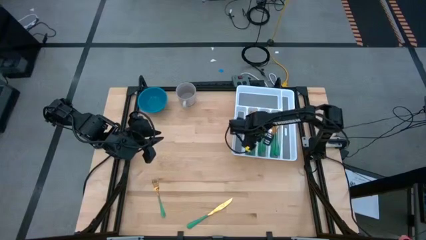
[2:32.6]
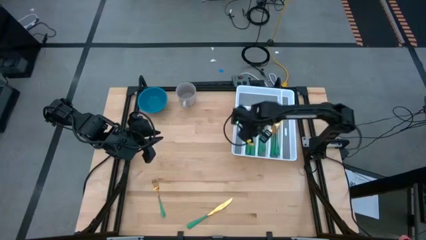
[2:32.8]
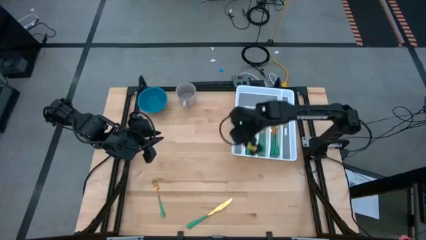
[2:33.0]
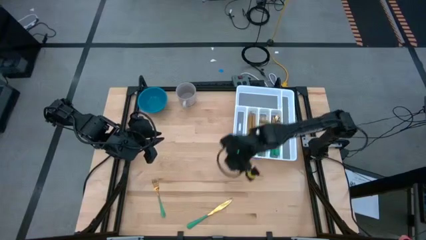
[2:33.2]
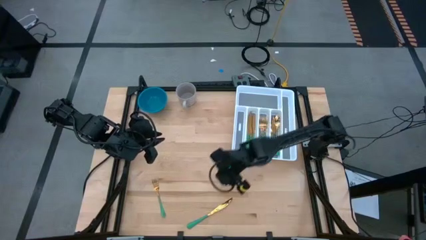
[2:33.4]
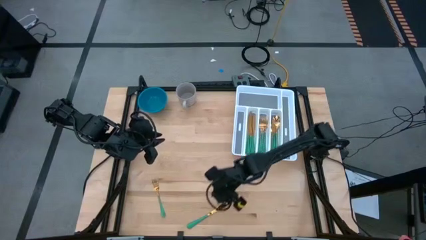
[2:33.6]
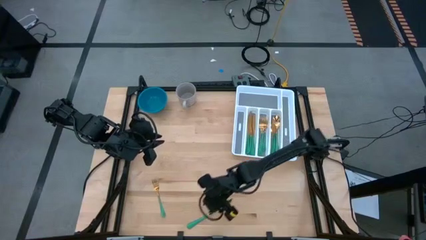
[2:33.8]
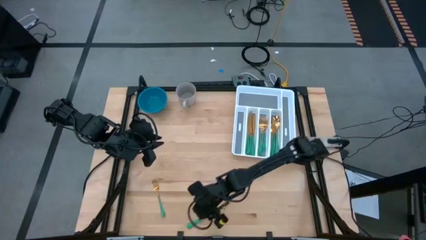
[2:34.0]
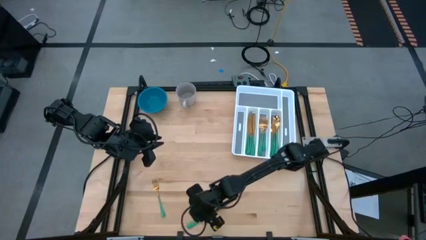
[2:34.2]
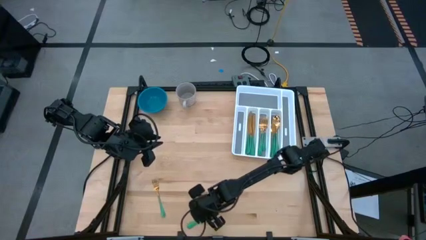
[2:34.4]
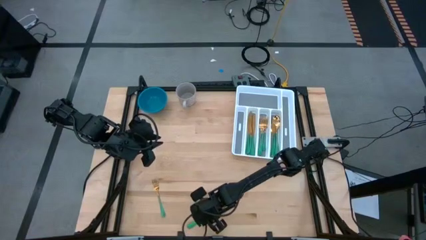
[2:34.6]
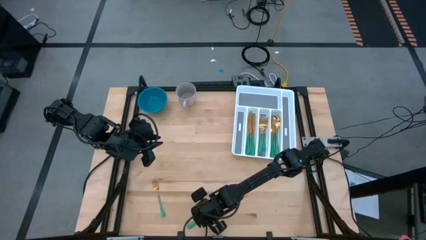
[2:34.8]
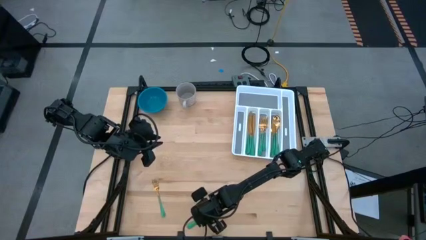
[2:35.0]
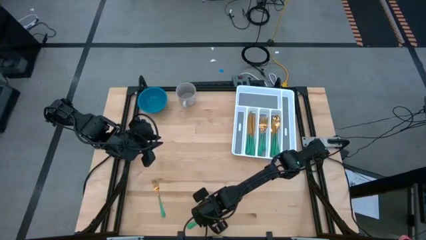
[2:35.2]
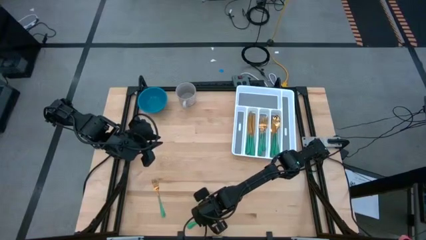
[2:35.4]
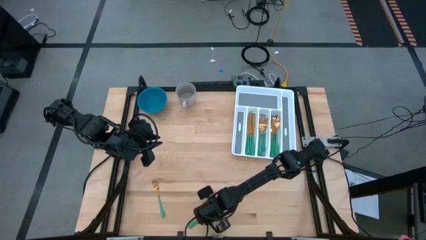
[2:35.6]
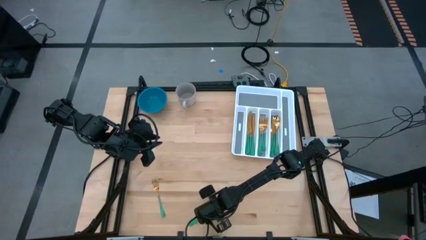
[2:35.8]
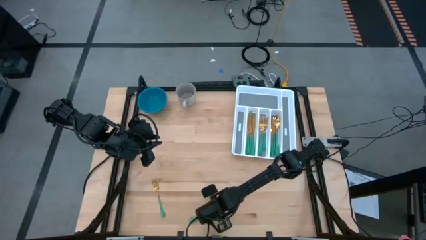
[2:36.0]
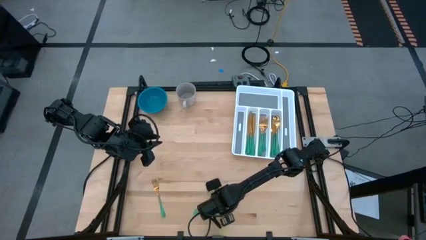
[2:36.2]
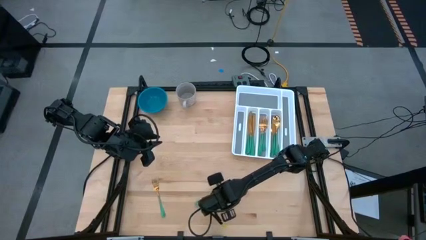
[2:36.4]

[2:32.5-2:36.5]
Task: Sort silverware
Put the green table knife into the white cutlery tray

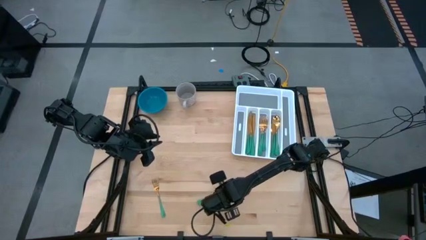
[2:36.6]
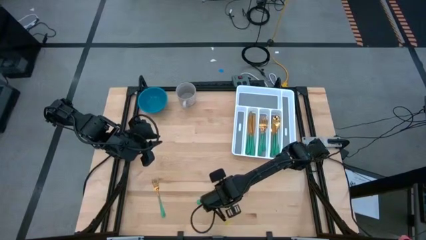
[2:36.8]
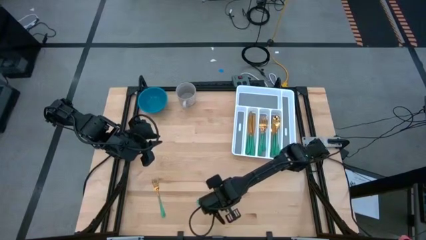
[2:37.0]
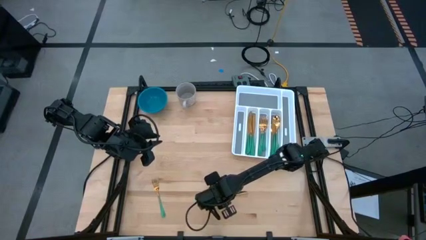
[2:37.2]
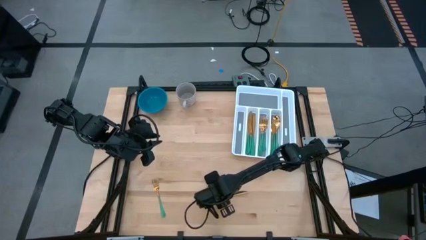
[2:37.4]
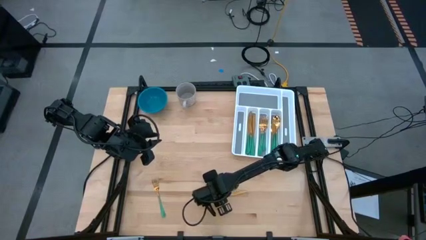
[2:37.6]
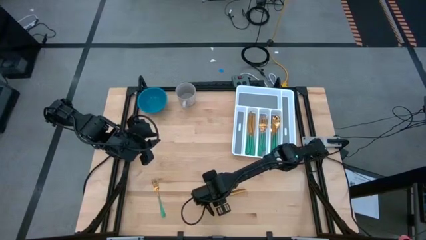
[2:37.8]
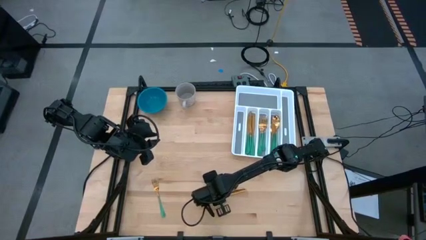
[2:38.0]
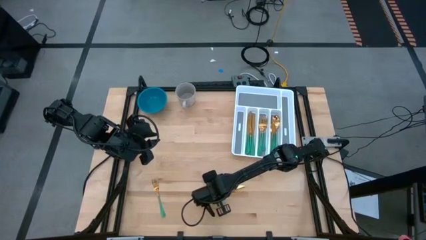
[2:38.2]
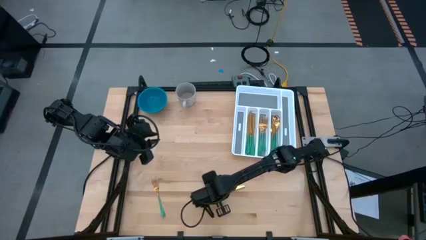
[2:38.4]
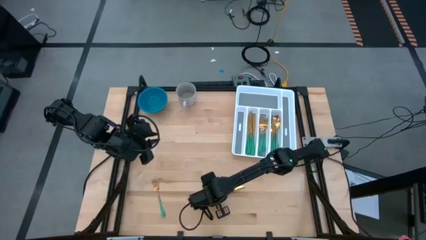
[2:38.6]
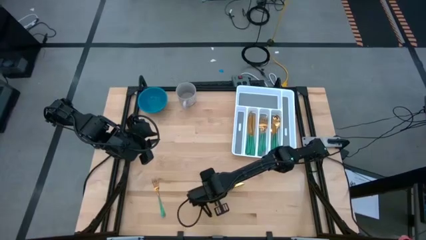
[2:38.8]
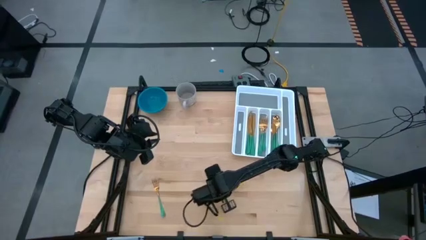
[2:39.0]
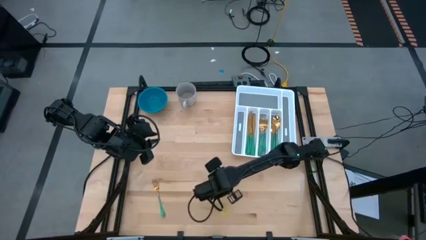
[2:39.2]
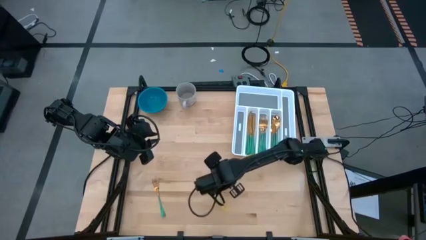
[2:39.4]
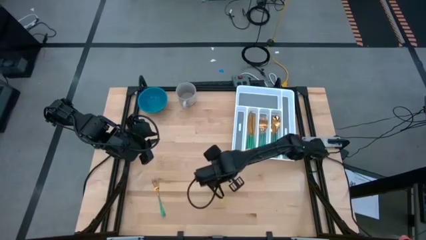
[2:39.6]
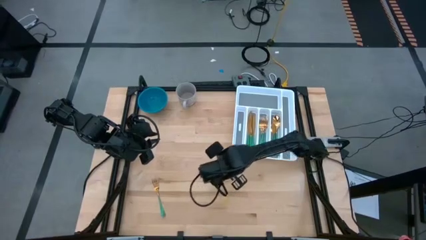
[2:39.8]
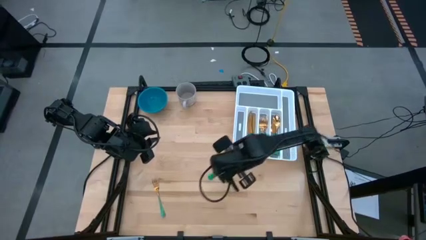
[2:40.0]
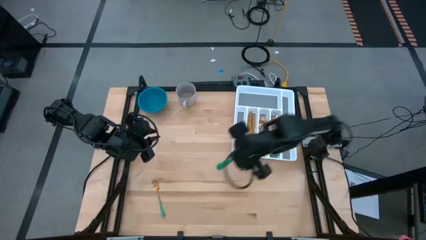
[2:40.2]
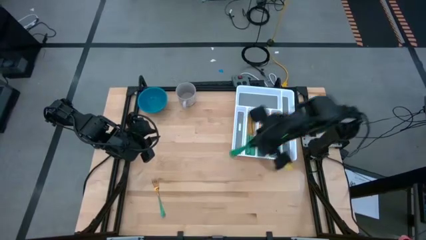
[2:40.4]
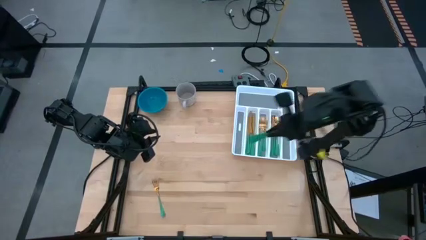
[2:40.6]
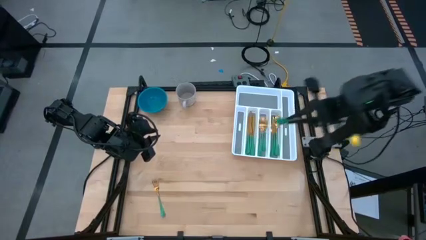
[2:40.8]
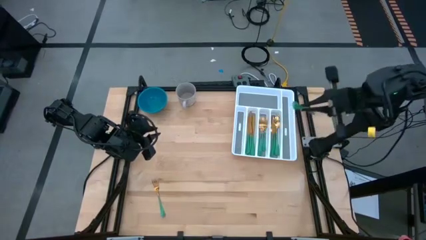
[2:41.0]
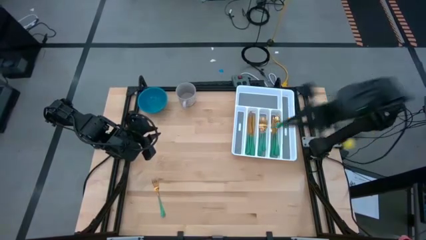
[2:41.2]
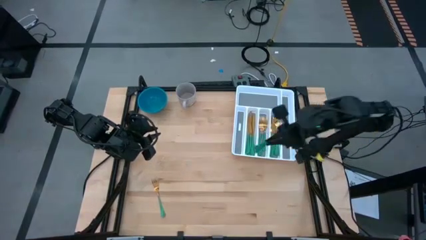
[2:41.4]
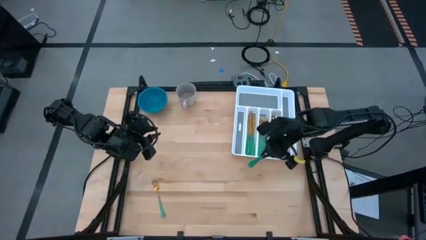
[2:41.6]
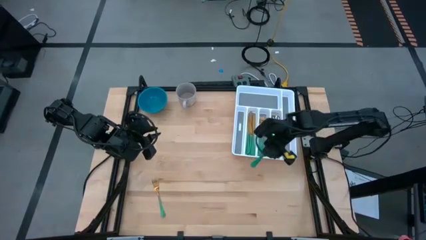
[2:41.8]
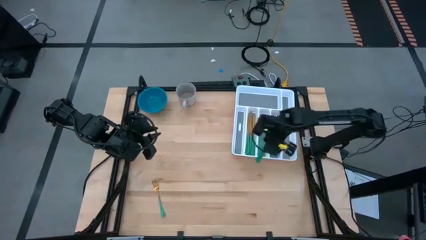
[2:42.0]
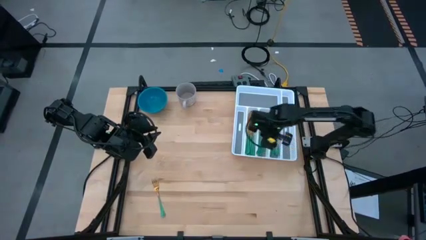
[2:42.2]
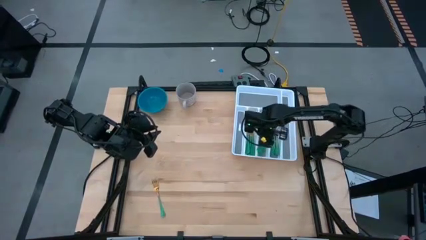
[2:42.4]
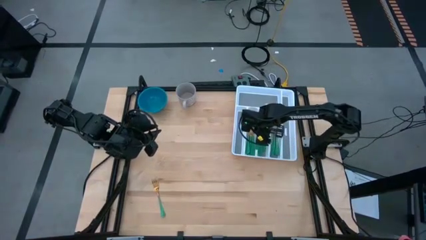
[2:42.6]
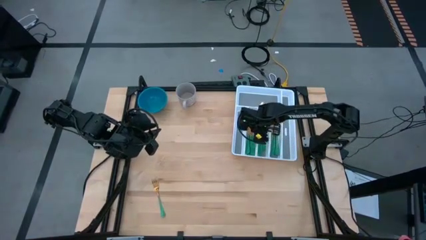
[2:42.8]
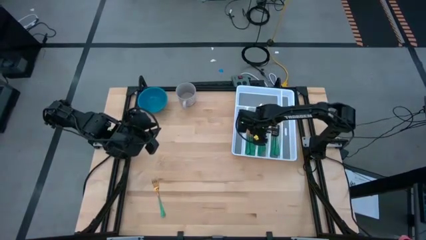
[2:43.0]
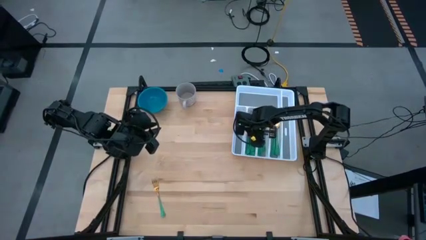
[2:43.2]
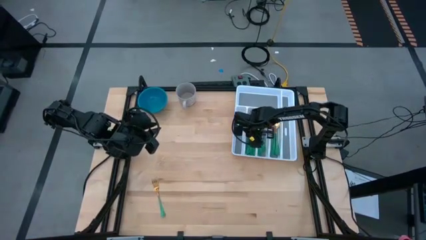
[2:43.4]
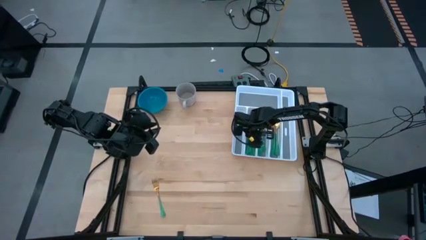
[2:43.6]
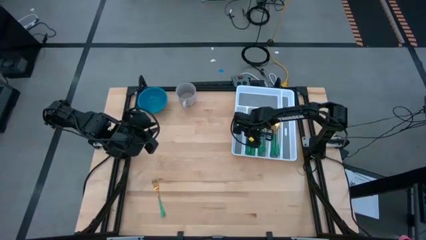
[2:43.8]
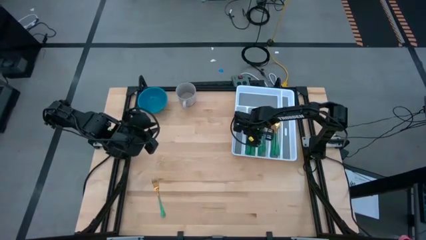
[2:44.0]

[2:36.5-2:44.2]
Put the green table knife into the white cutlery tray

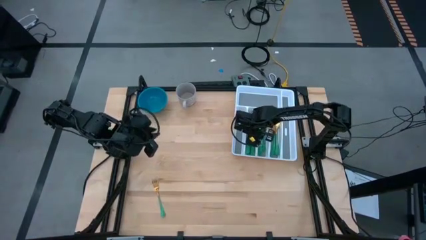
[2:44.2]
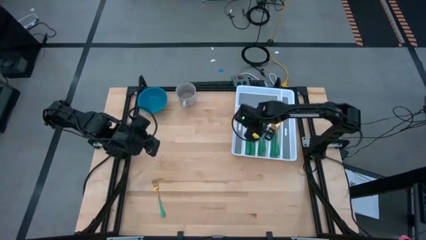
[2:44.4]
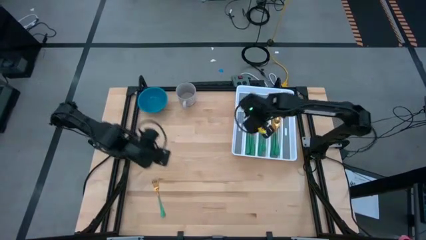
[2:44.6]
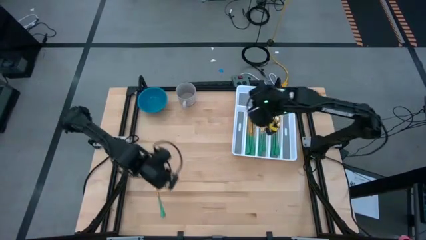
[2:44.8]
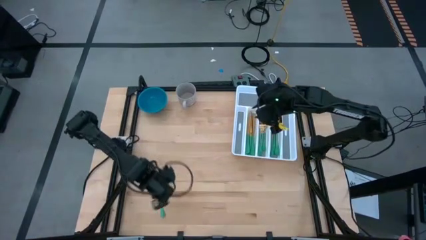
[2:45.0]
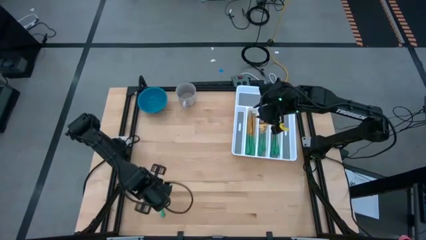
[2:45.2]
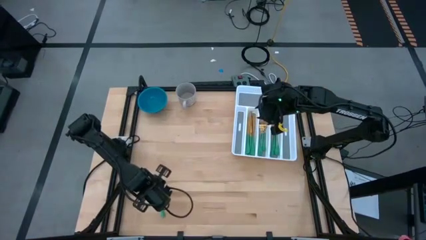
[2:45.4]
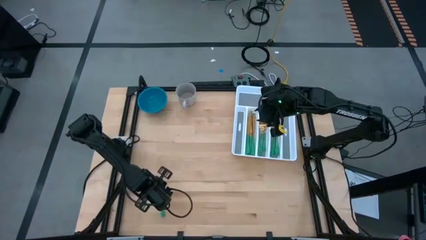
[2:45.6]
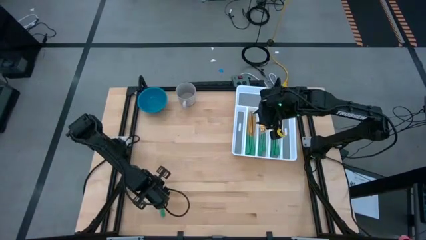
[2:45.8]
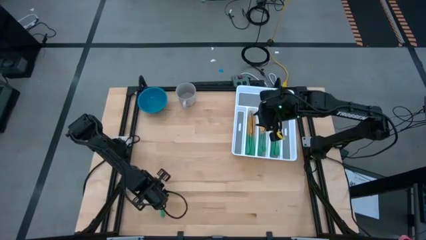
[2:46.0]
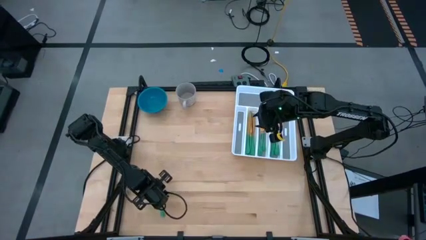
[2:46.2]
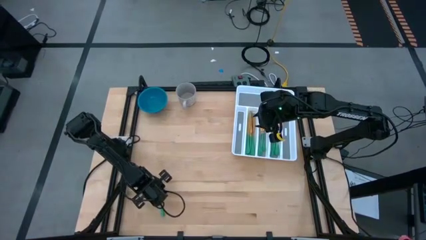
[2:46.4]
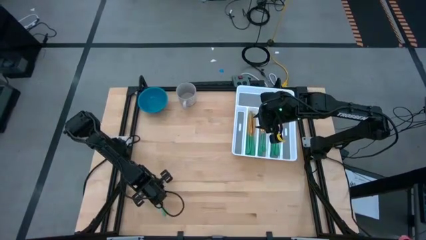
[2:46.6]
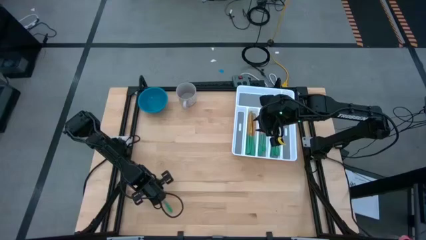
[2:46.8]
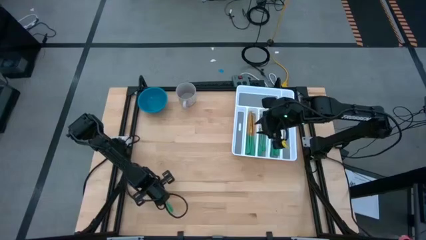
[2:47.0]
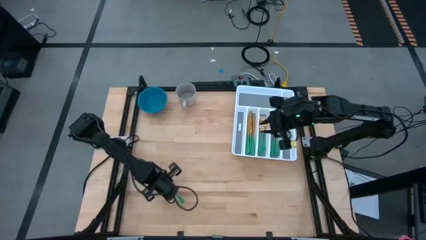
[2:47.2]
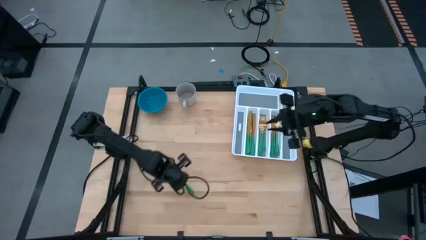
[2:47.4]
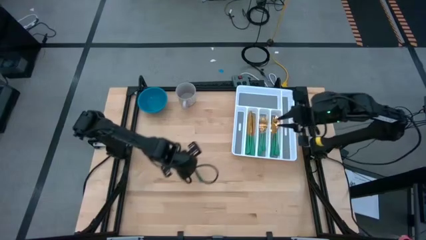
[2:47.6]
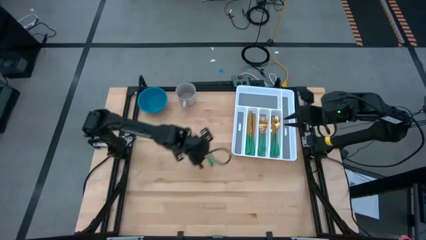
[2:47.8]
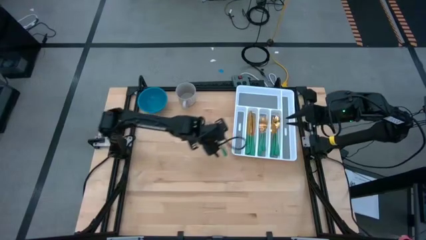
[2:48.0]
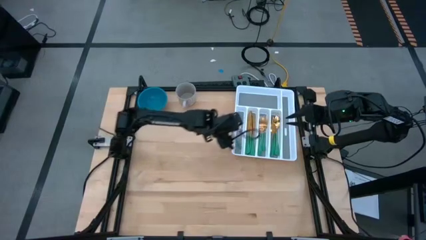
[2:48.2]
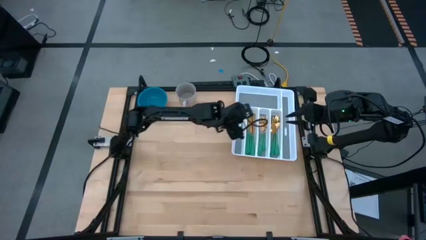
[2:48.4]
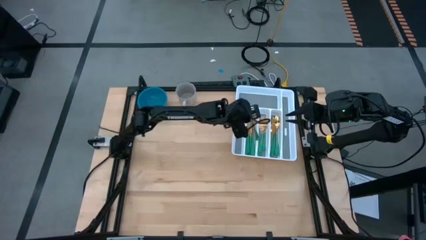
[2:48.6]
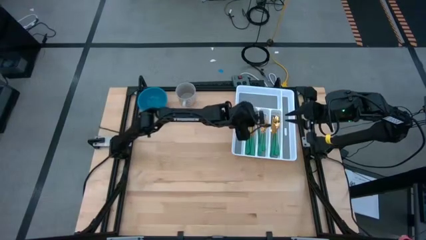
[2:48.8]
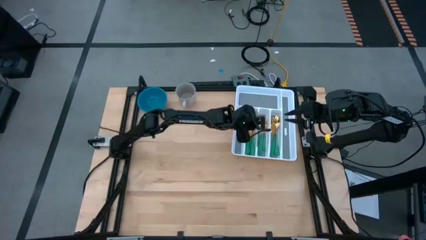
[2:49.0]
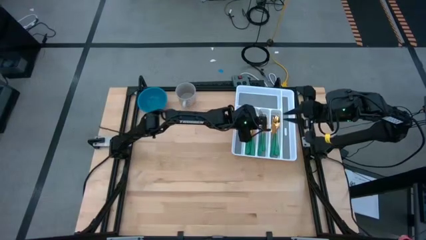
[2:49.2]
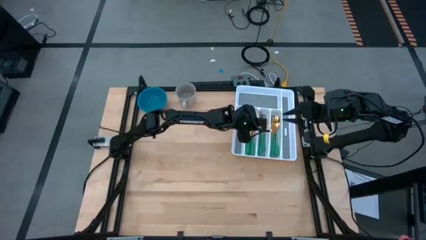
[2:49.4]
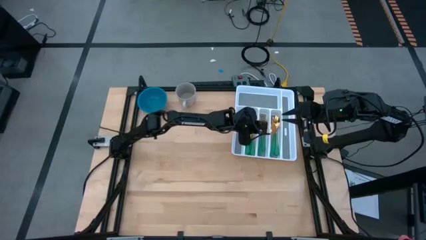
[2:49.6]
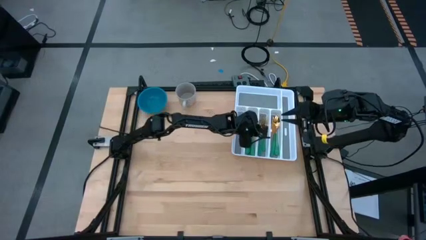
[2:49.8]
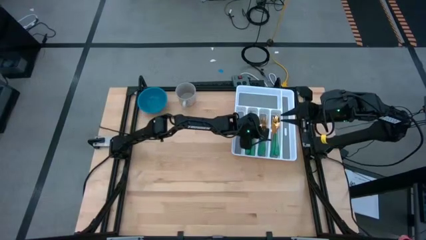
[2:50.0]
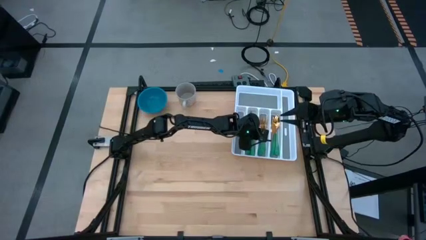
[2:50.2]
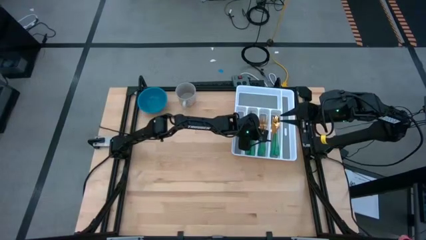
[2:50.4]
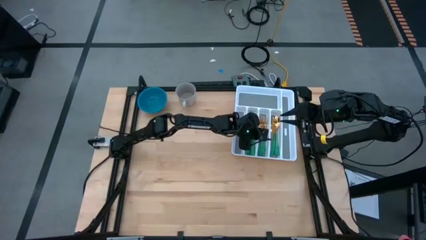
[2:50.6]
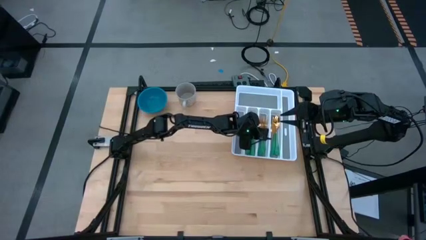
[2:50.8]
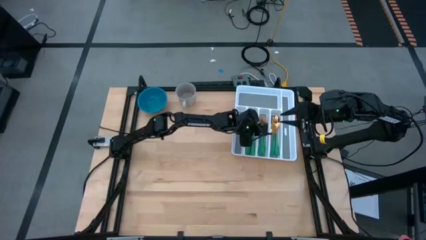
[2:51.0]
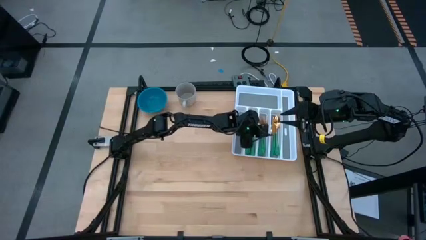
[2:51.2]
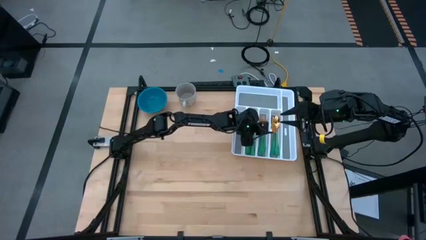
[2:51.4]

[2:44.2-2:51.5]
Put the green fork into the white cutlery tray
